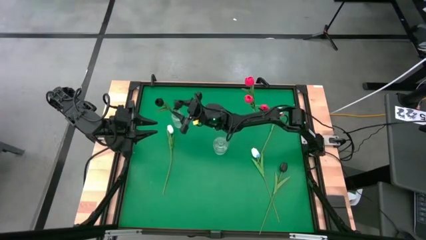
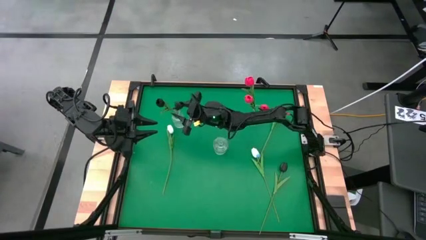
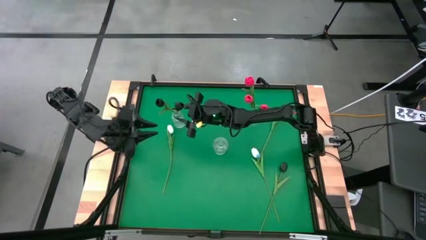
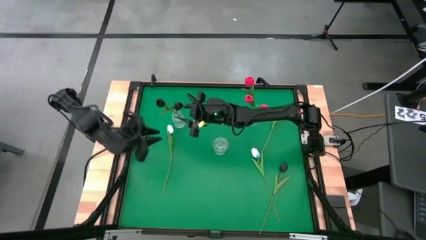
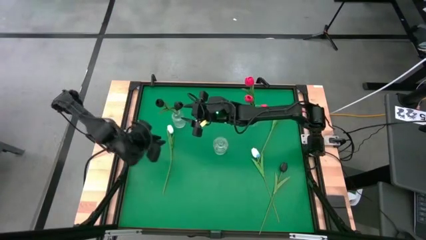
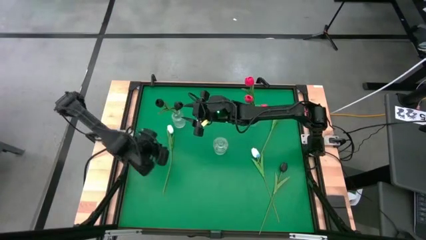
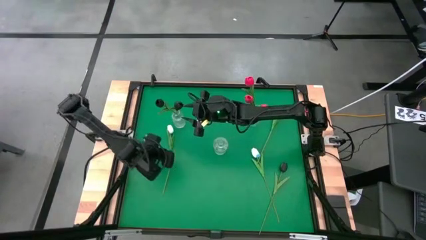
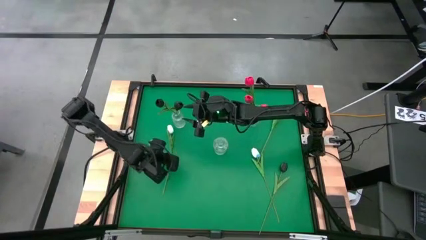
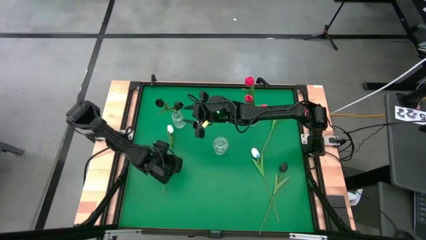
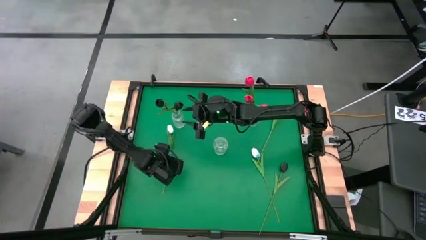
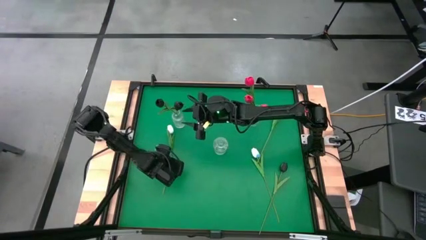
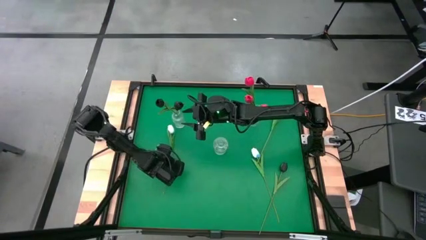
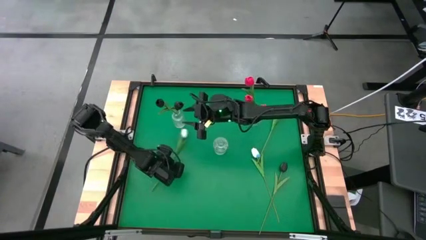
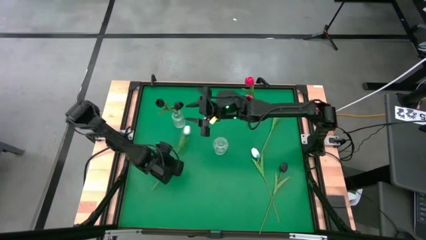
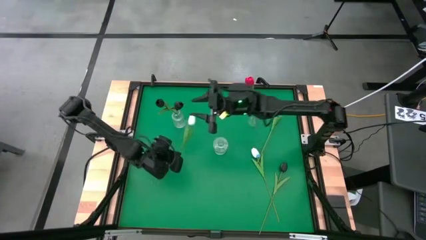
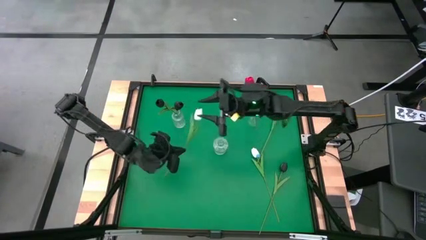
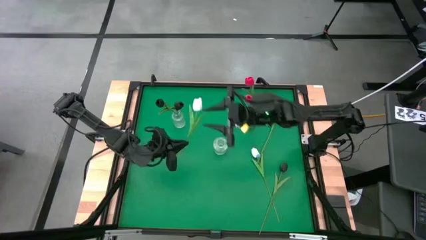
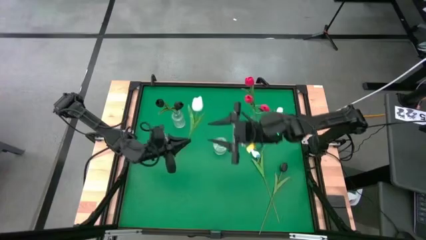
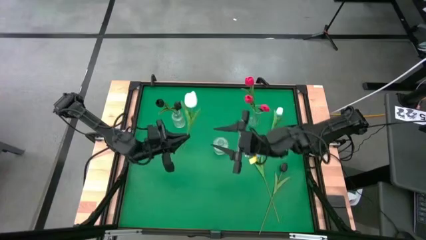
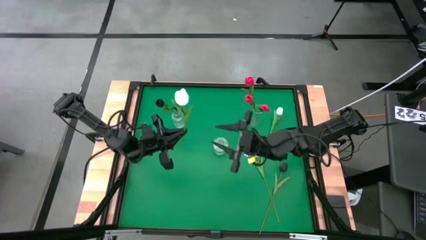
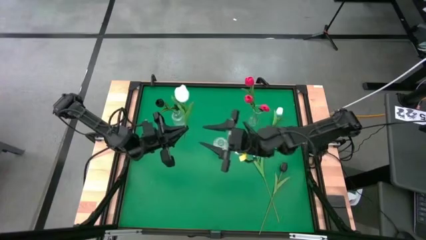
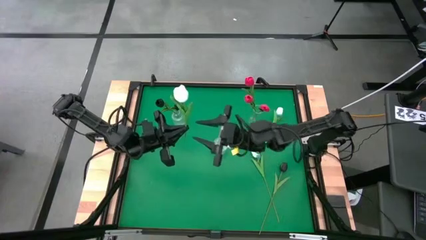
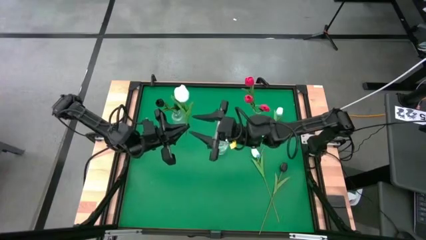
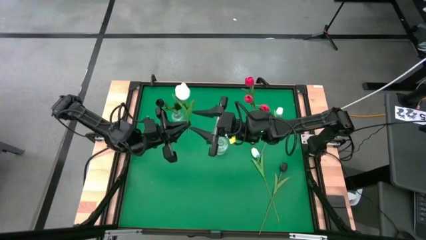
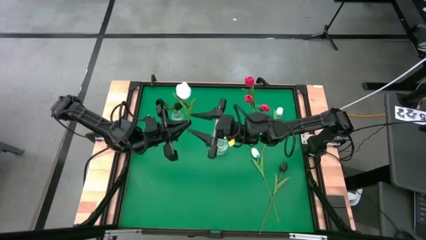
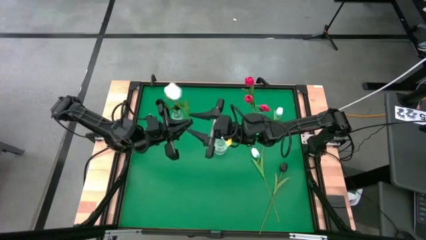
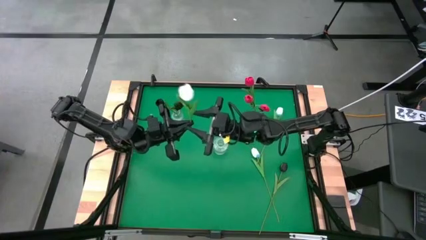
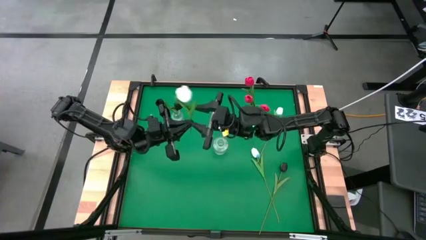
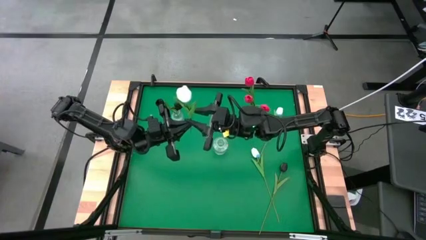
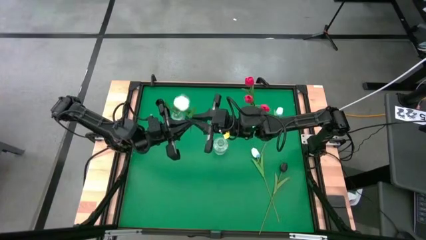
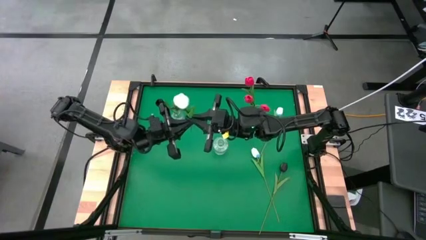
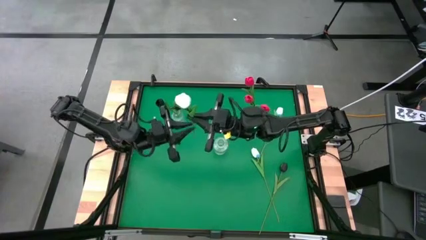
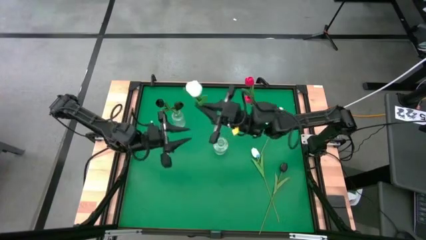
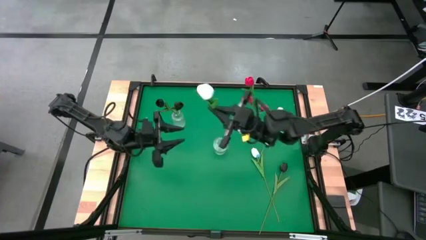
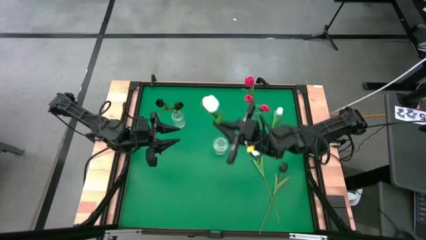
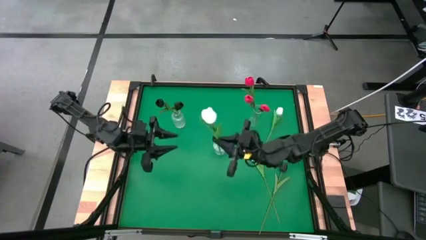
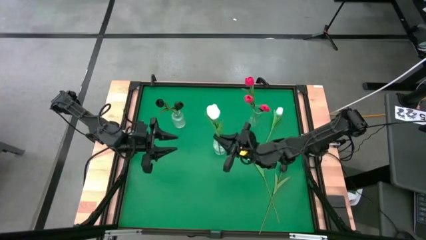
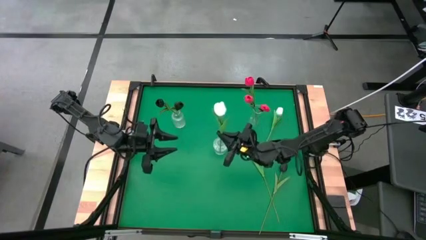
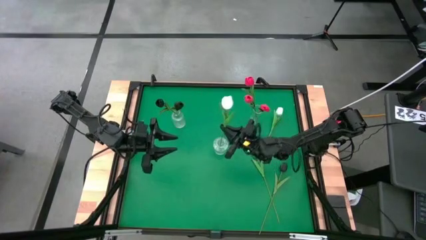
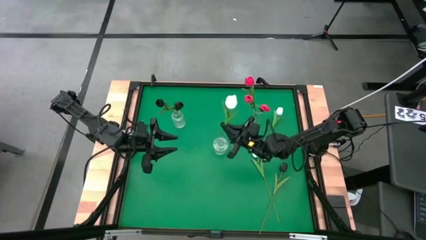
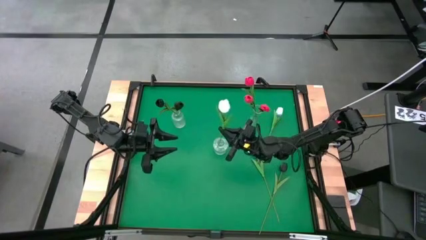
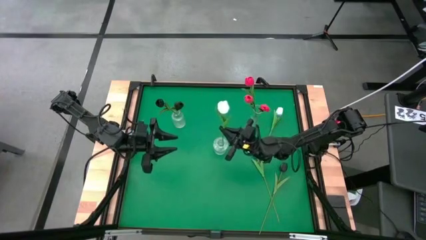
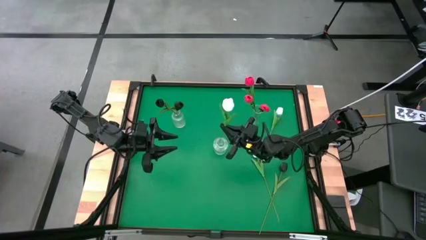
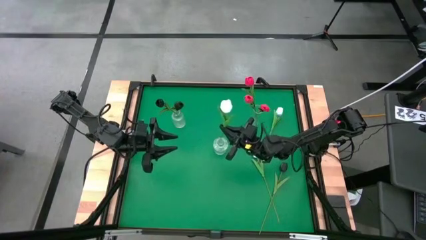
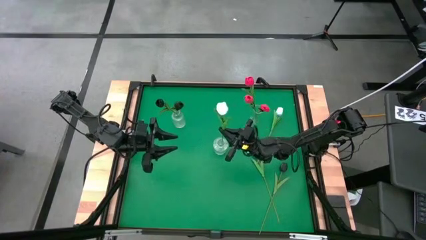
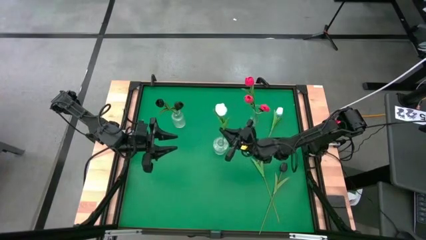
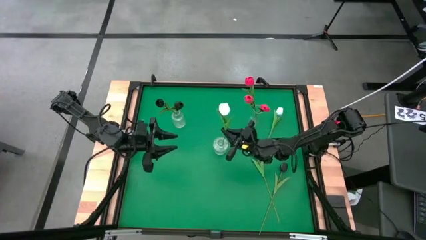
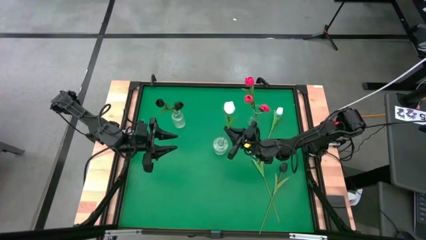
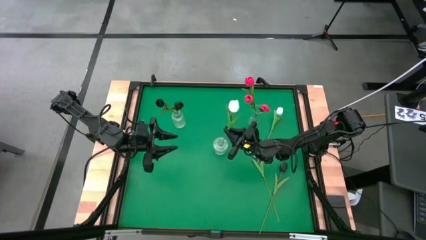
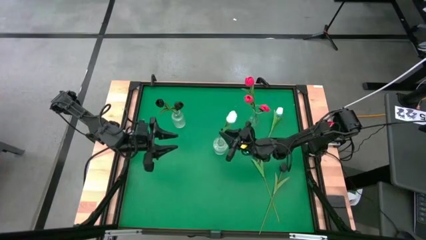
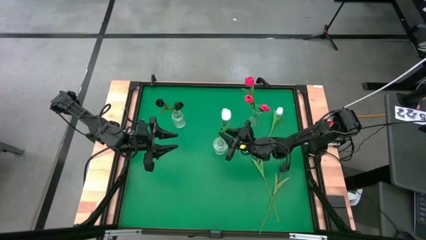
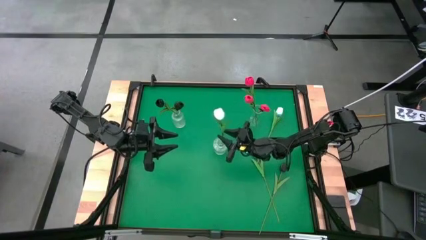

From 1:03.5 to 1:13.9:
Task: Sort flowers into vase by color
Put the left white tulip into the middle transparent vase

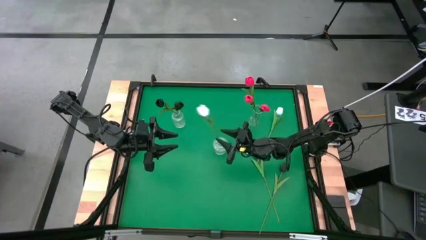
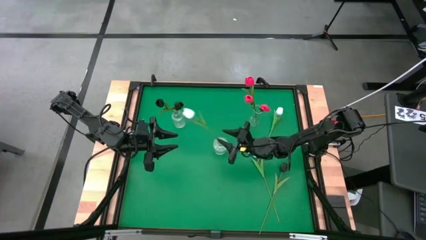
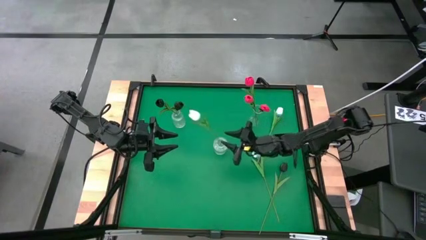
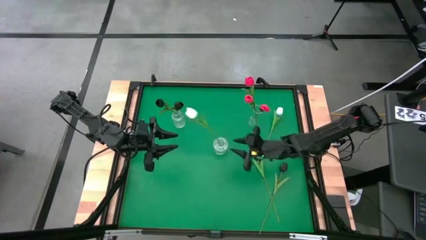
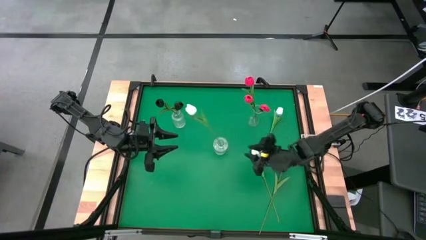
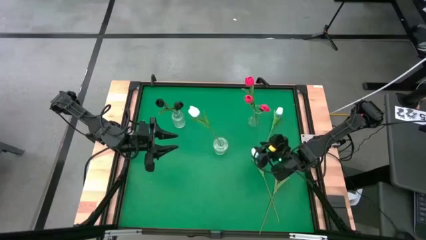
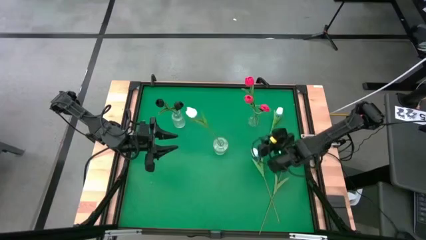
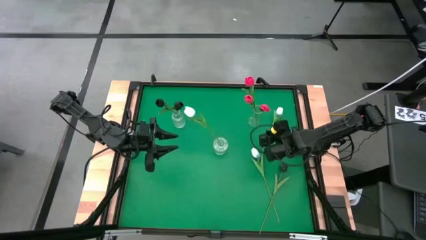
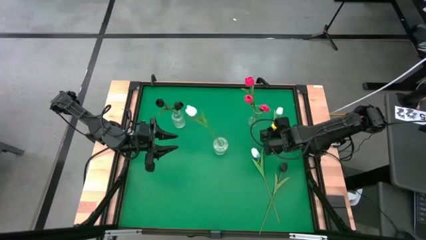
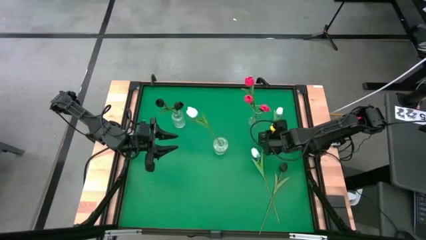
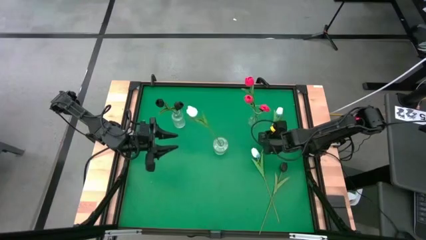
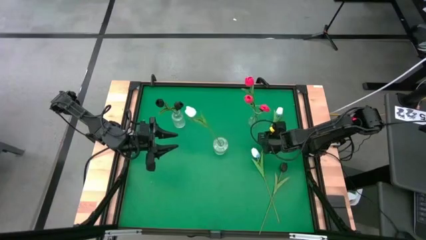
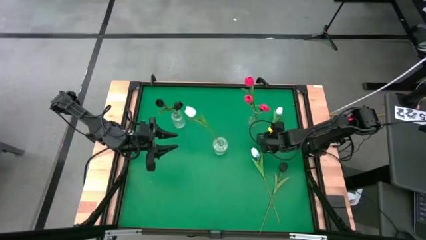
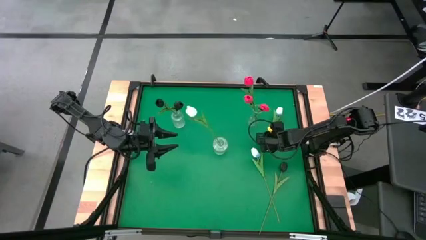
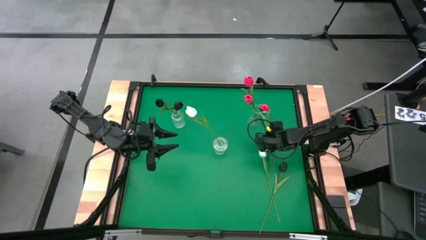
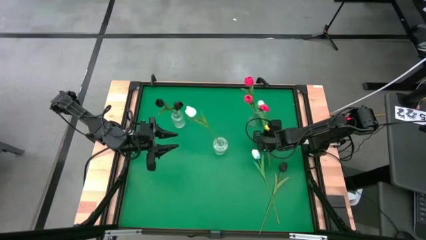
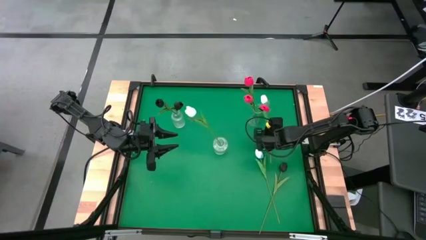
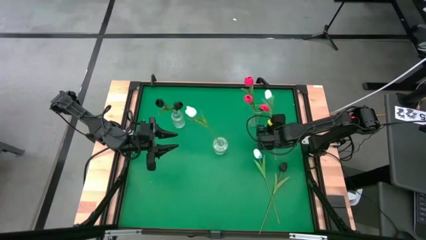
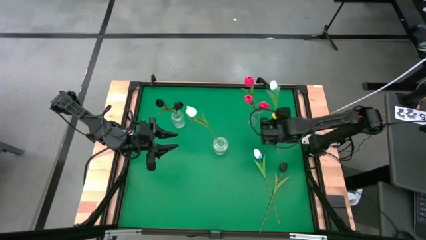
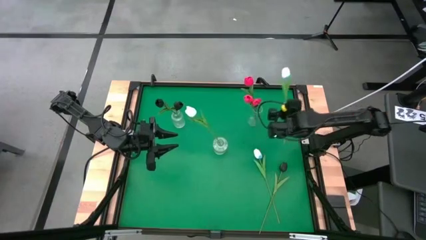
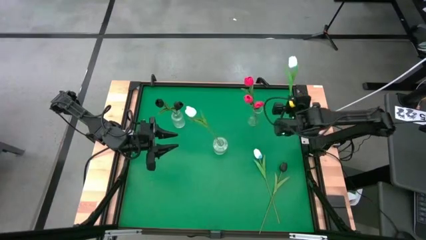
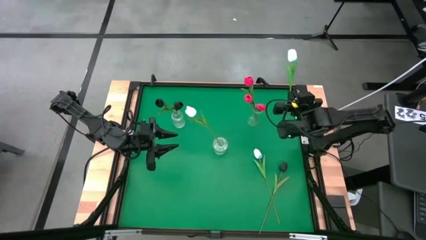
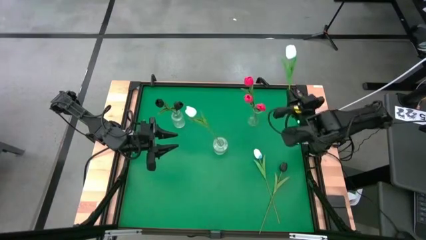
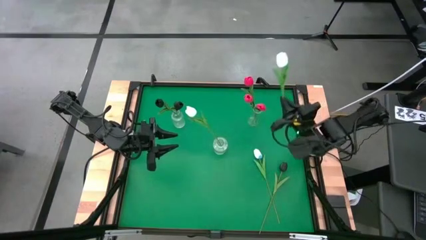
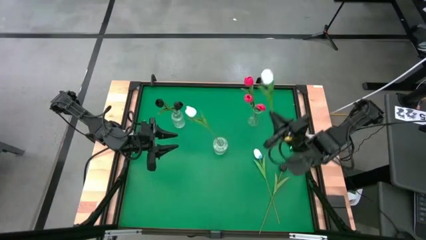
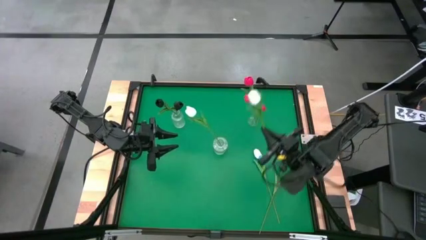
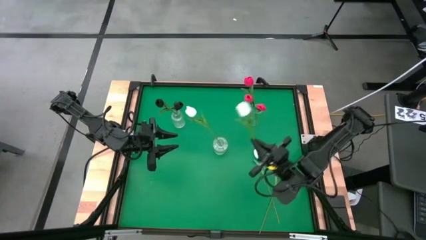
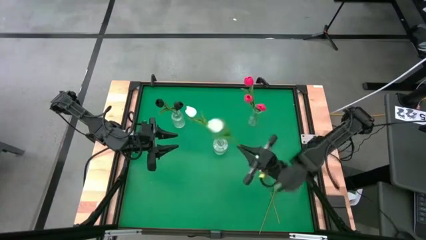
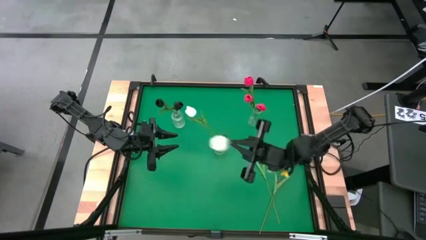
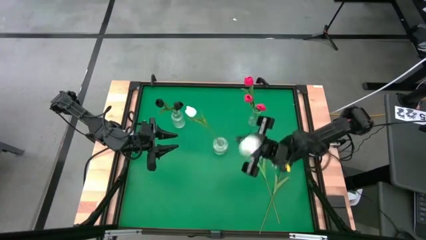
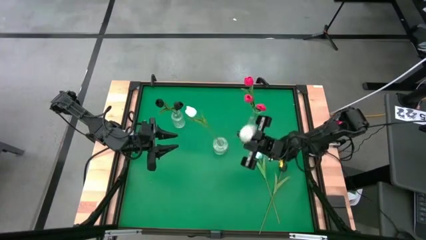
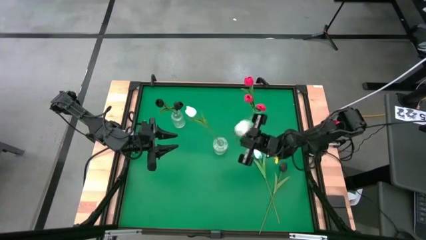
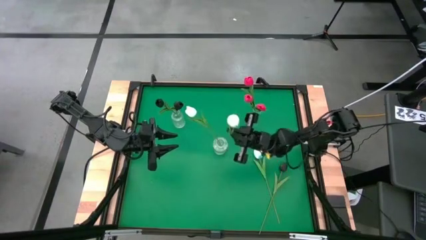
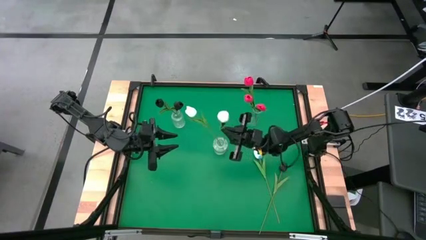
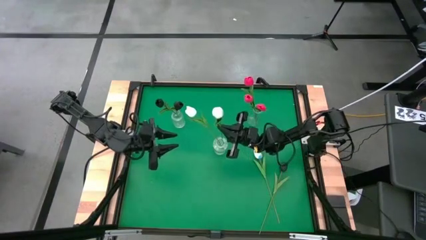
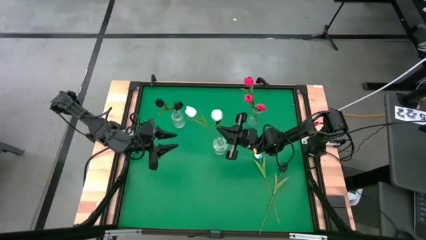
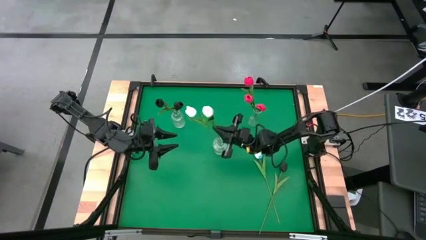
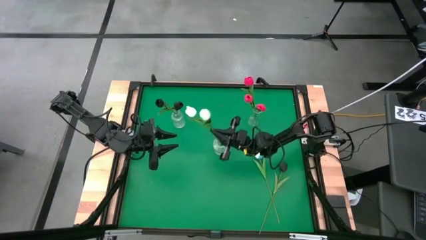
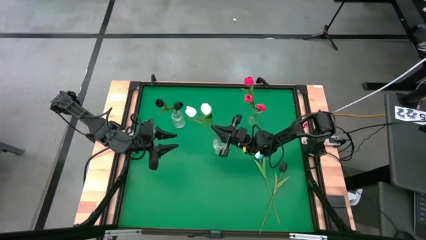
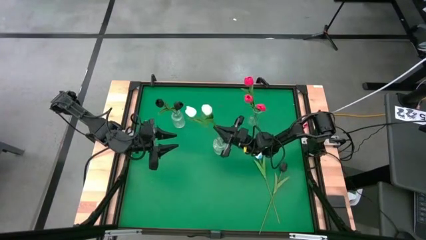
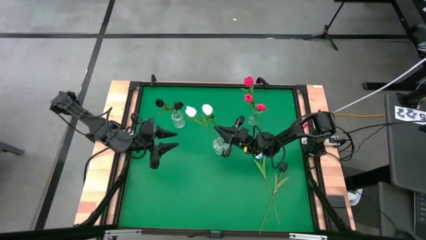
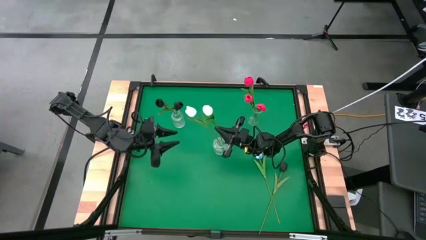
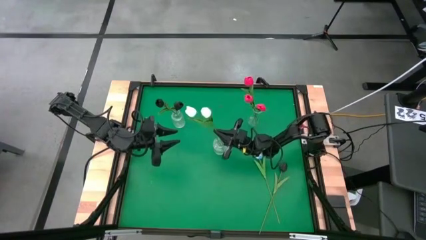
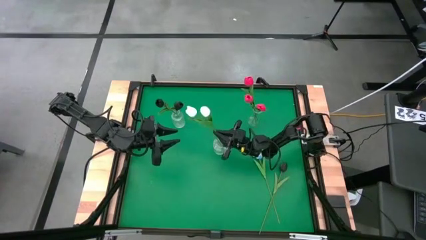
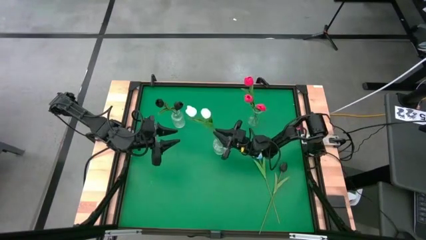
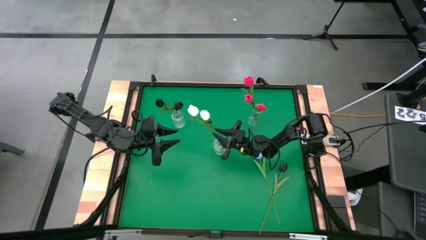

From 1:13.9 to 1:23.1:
Put the top white tulip into the middle transparent vase
